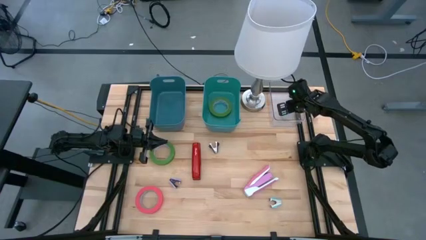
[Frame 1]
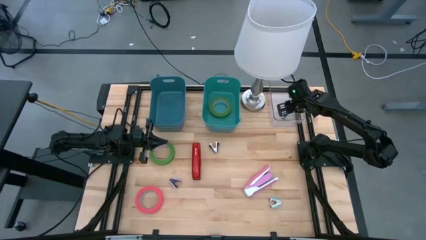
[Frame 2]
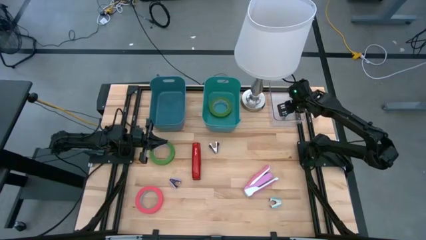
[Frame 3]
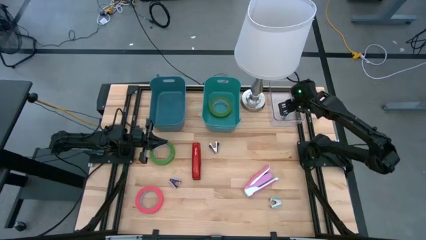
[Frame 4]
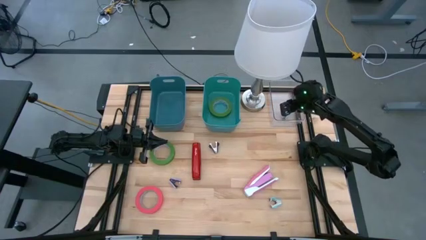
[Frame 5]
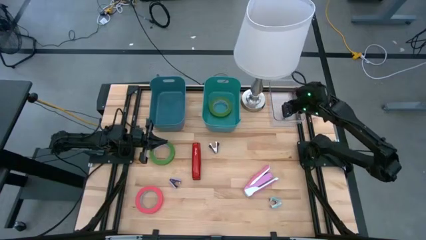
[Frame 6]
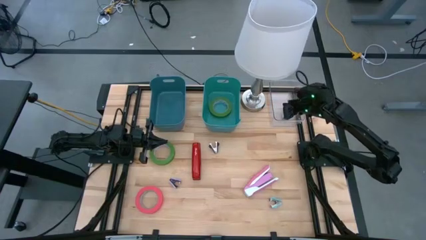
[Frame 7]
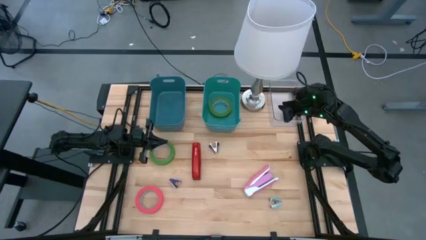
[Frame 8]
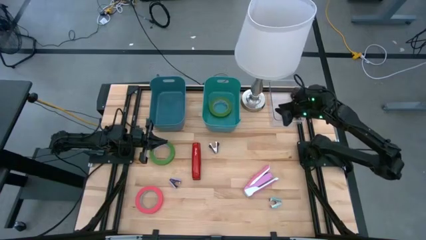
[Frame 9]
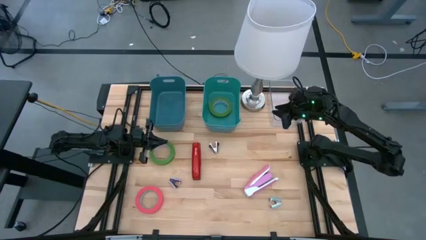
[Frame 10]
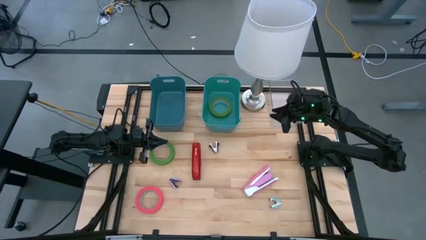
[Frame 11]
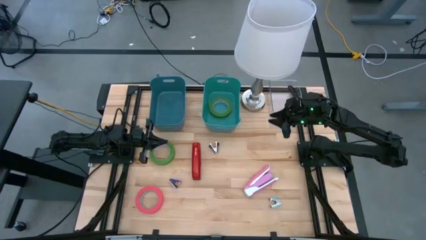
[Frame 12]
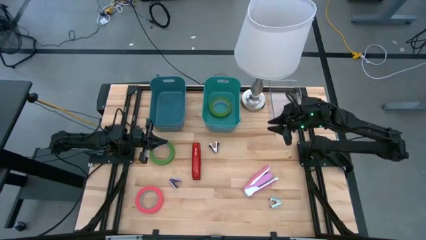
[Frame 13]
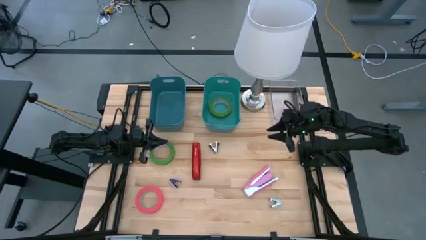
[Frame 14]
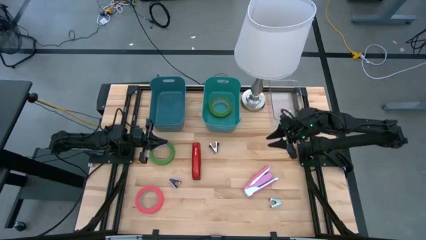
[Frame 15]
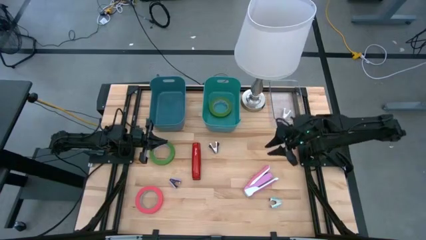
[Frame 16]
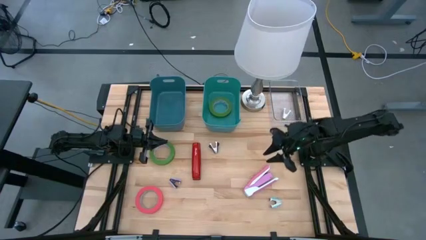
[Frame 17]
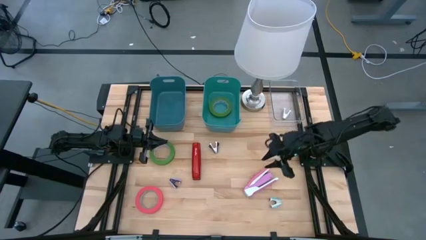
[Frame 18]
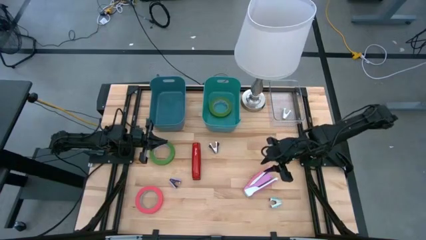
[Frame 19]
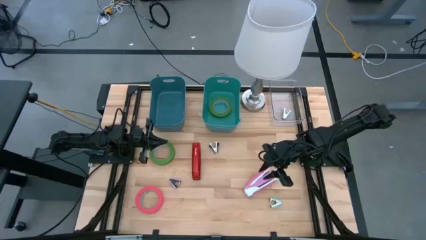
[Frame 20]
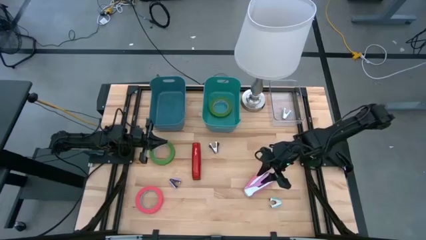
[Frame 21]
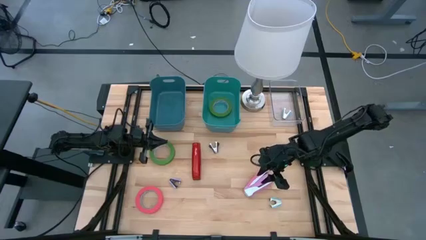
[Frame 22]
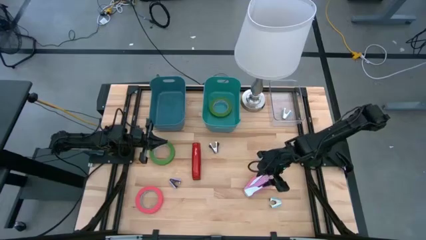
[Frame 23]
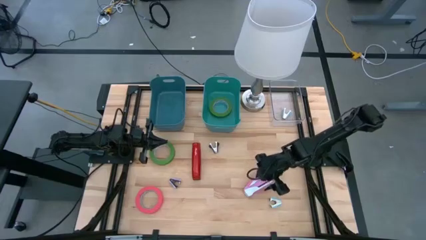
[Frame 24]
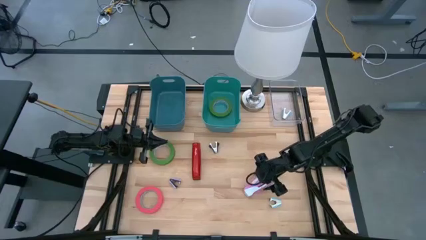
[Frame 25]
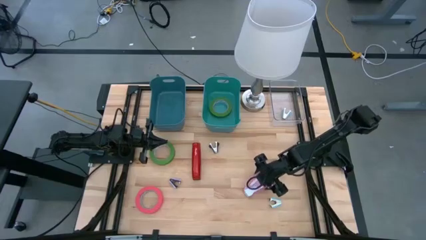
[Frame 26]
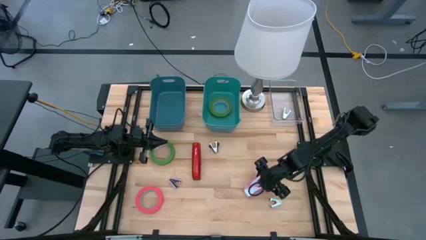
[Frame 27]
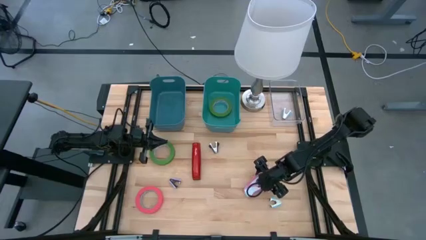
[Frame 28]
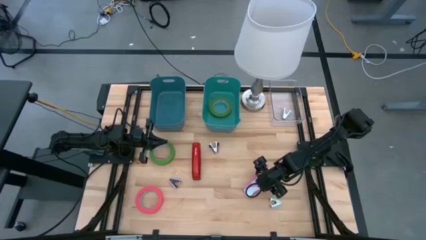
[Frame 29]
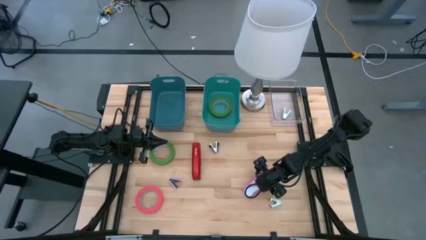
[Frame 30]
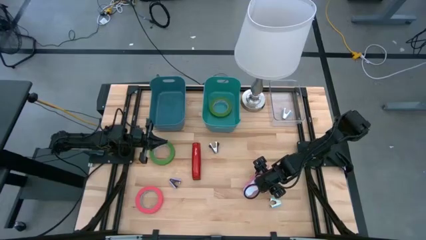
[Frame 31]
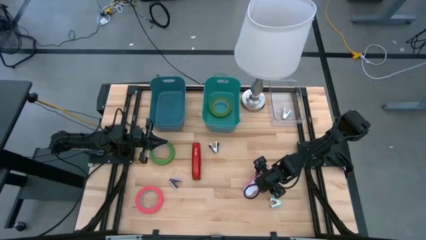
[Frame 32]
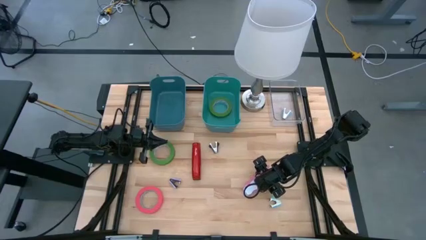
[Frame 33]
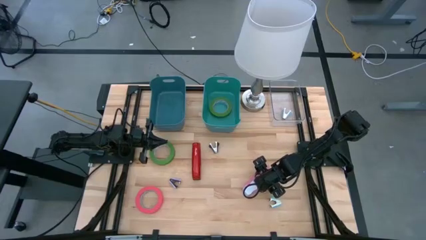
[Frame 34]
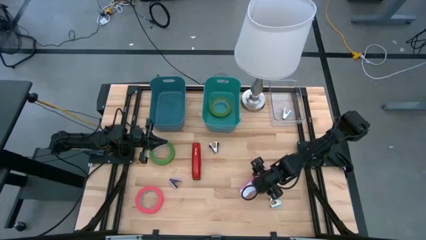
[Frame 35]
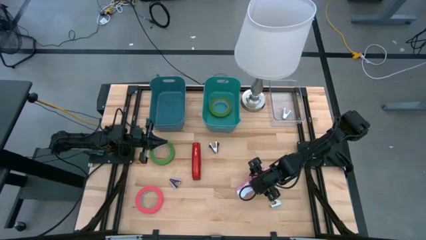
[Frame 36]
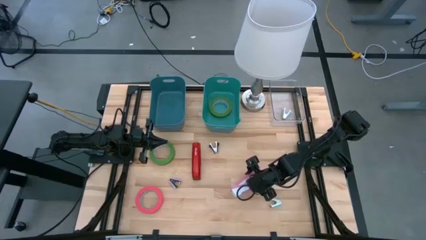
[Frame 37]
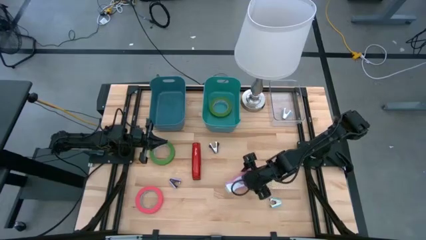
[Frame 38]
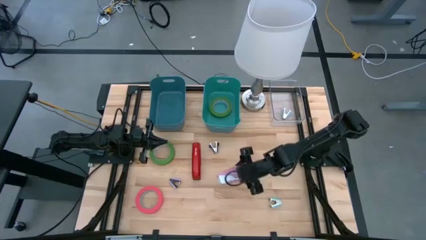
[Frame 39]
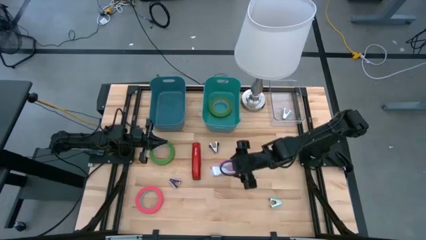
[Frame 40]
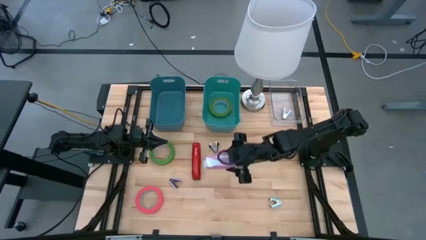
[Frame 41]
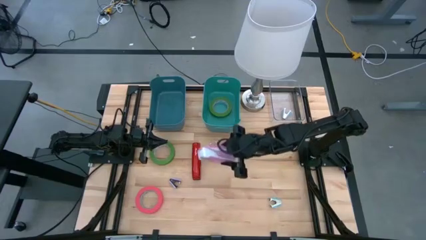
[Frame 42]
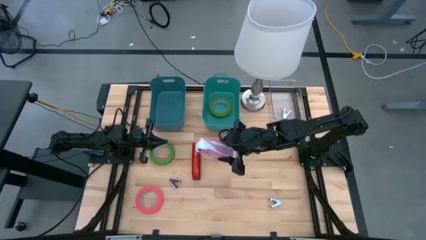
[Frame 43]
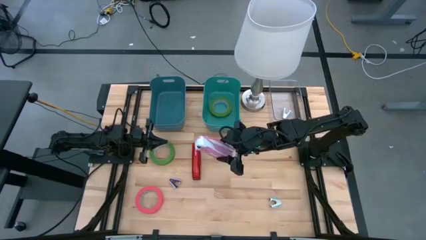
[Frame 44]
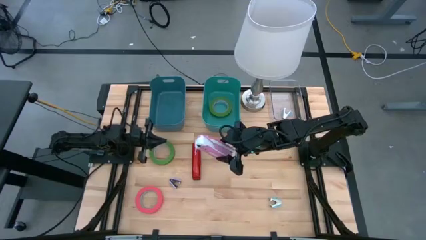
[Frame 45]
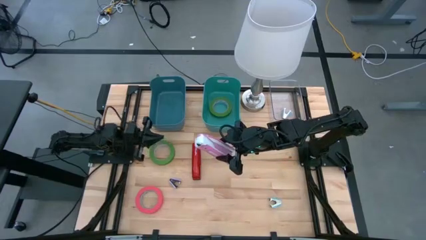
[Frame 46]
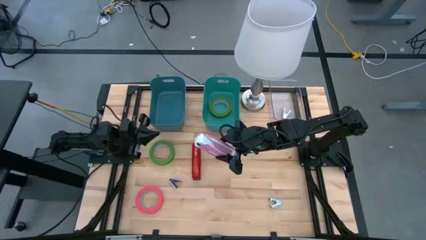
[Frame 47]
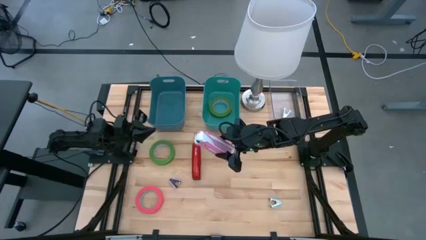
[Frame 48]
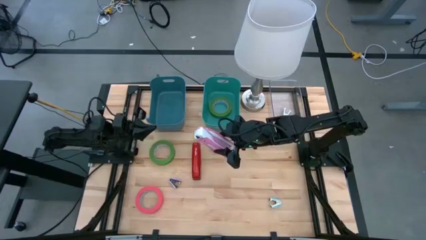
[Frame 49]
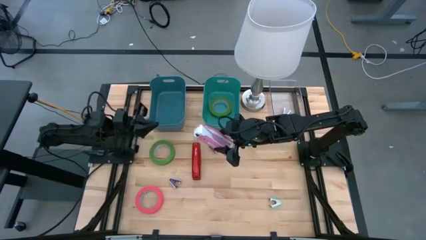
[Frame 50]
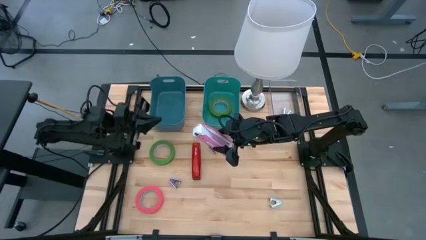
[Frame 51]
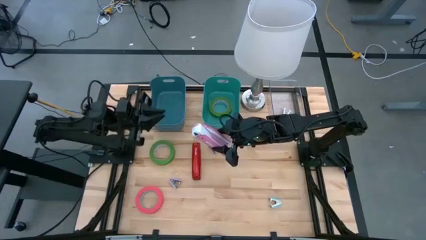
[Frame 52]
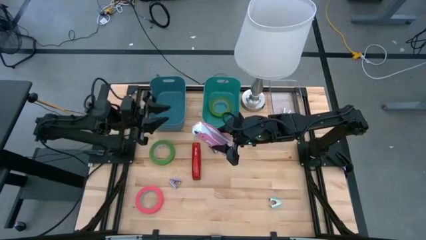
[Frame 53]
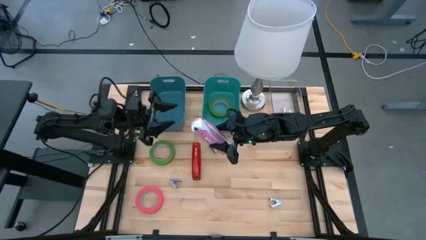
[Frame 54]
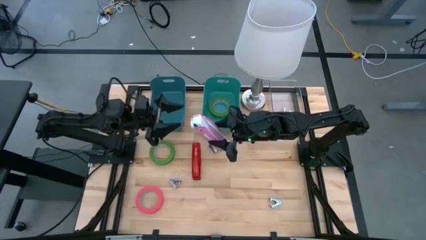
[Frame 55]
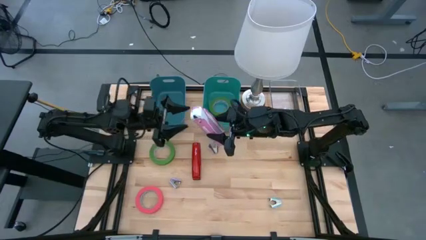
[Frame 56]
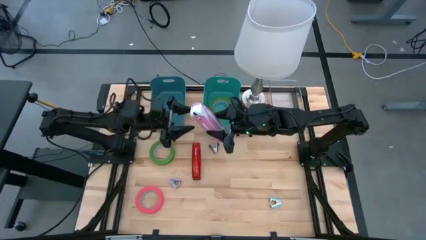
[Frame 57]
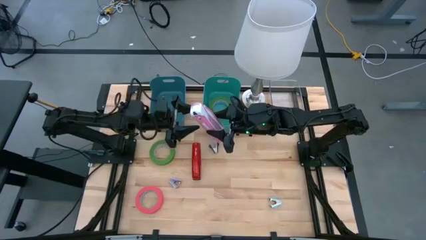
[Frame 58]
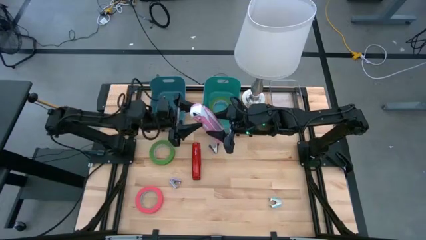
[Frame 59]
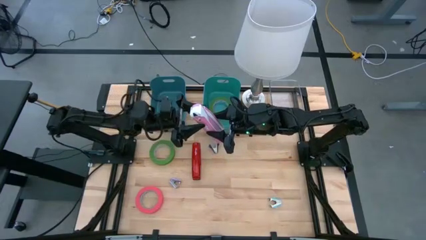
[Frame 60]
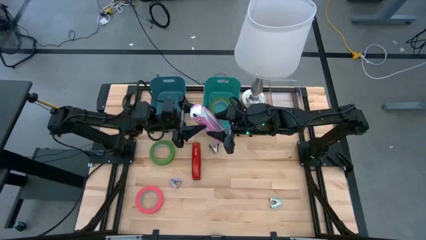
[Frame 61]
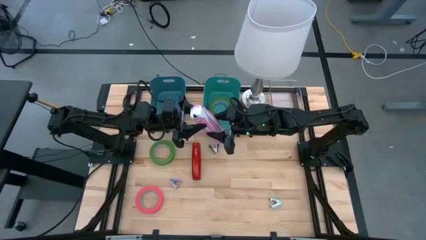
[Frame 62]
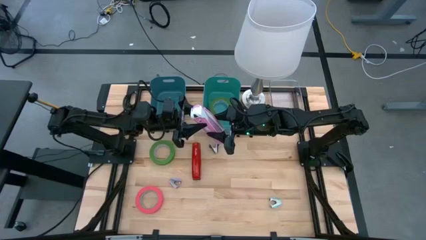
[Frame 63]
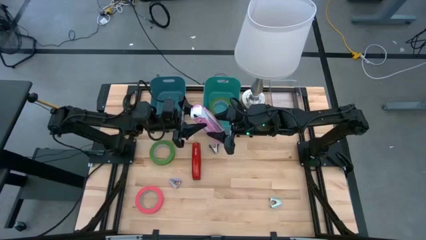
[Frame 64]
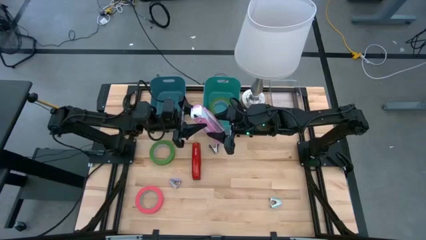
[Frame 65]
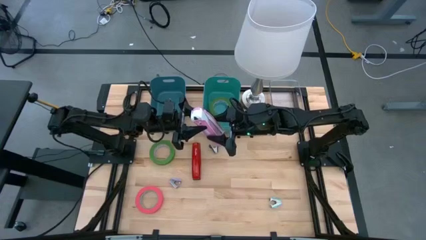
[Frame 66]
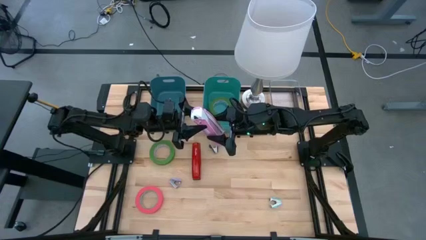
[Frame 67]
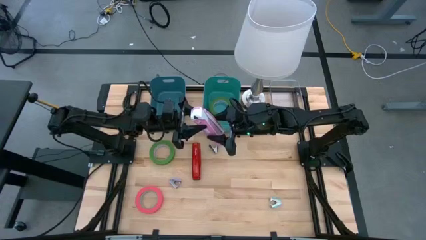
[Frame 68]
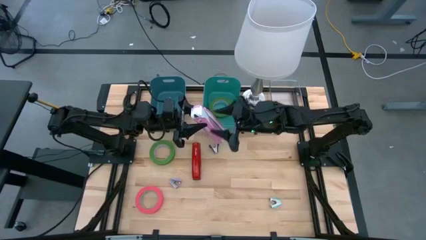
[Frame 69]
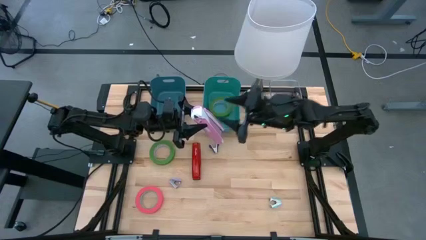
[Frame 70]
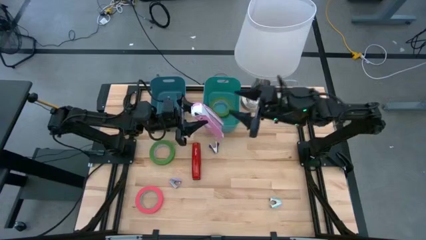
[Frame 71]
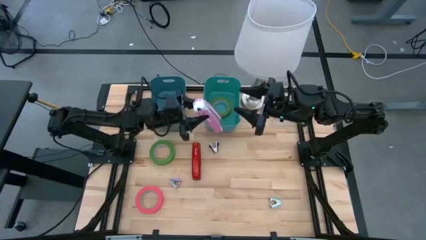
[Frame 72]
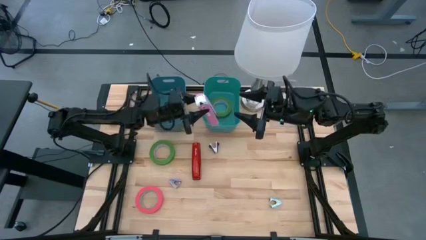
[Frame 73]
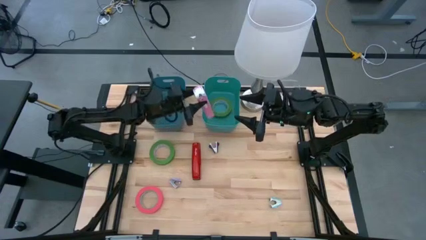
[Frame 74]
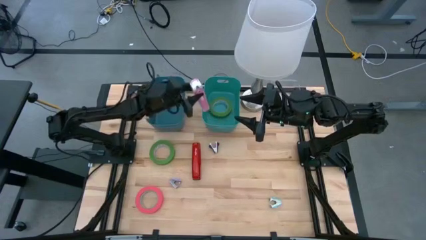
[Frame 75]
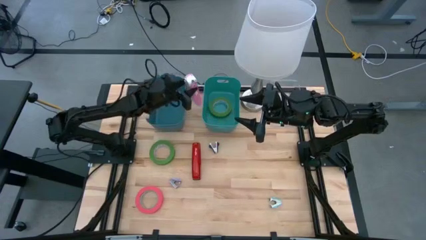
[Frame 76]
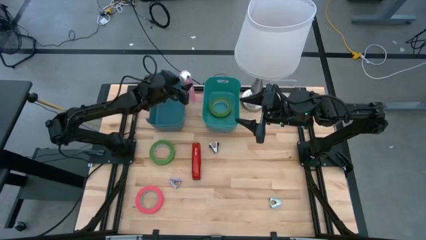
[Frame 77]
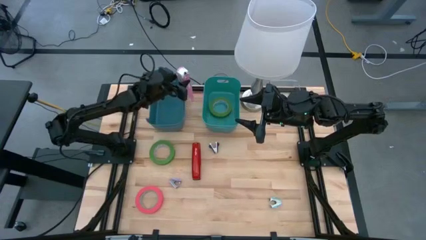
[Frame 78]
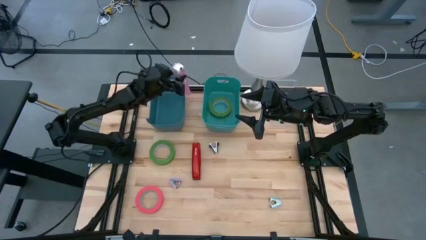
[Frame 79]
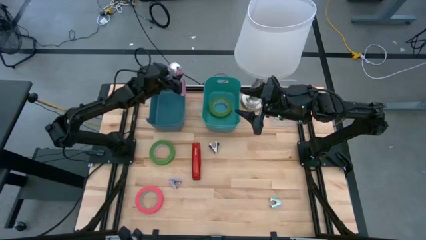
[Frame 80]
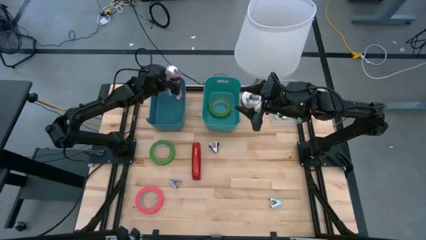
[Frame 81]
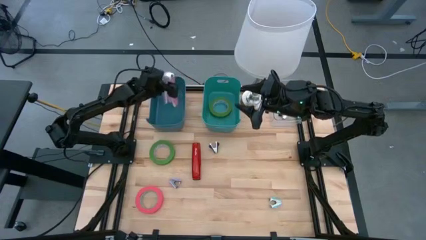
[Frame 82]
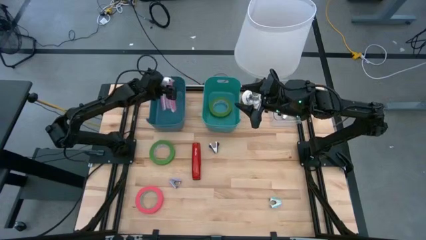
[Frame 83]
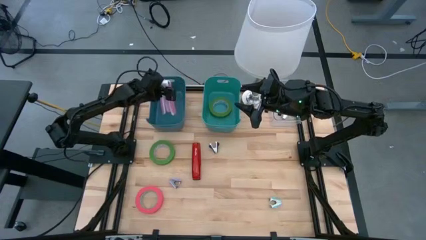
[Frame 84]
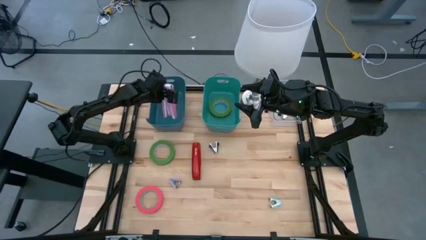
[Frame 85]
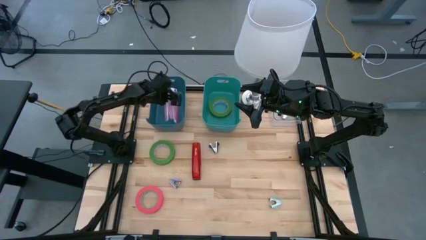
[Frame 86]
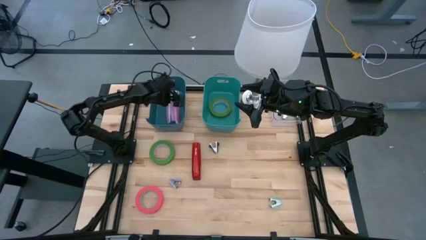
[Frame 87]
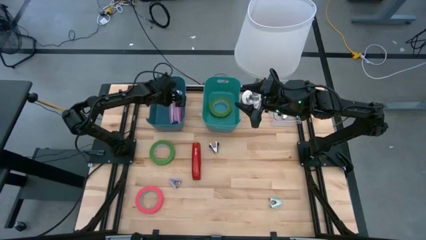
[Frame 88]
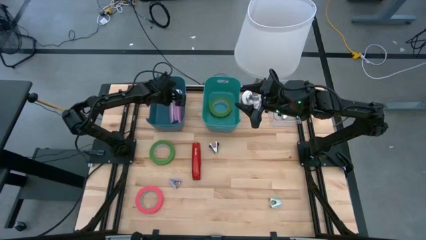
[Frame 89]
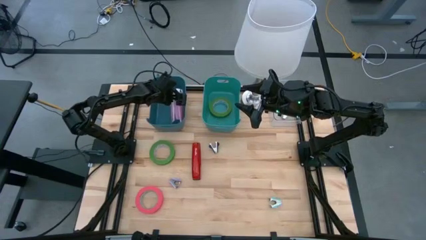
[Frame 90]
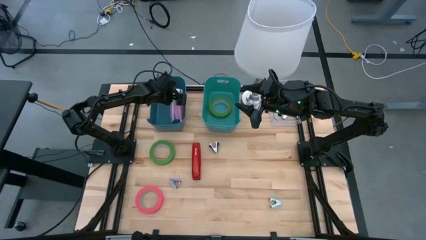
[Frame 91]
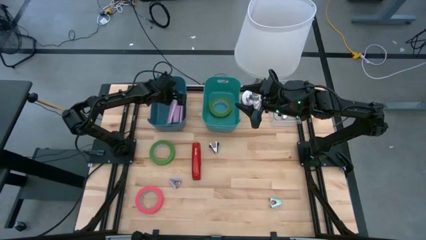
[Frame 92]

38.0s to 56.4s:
Task: Pick and place Stapler, Stapler remover, tape
Put the pink stapler into the blue bin
